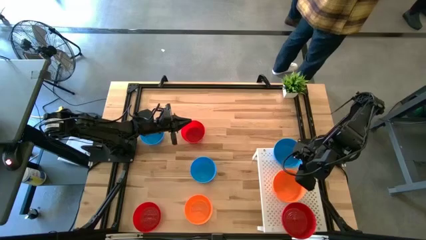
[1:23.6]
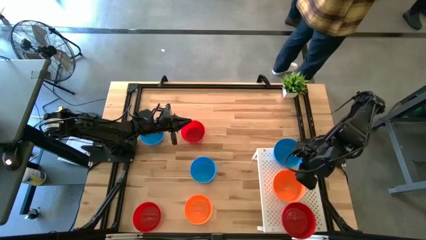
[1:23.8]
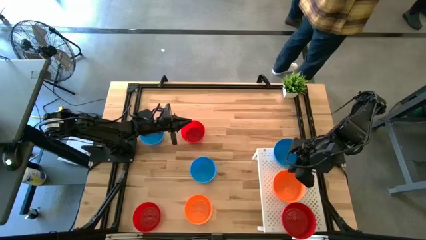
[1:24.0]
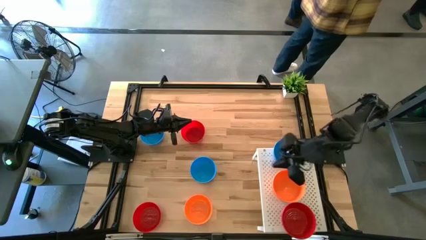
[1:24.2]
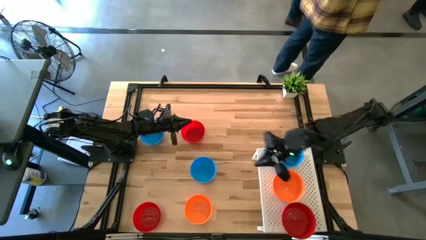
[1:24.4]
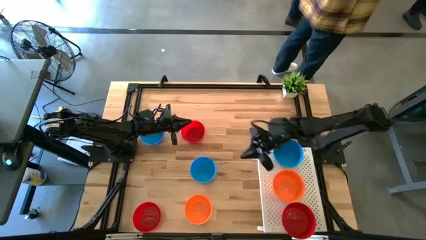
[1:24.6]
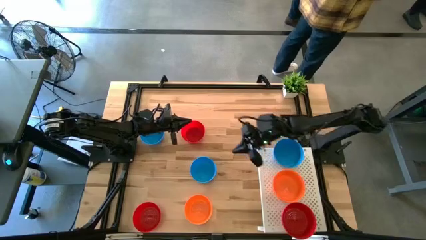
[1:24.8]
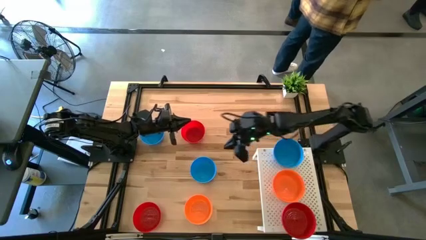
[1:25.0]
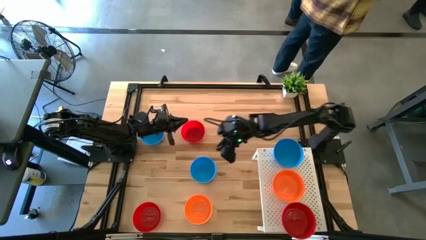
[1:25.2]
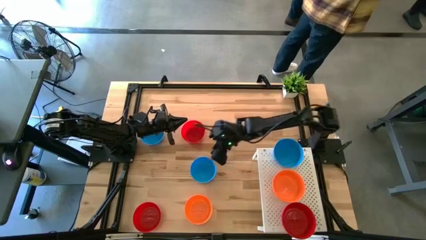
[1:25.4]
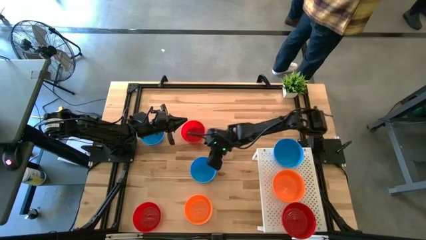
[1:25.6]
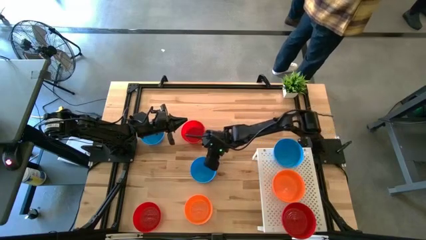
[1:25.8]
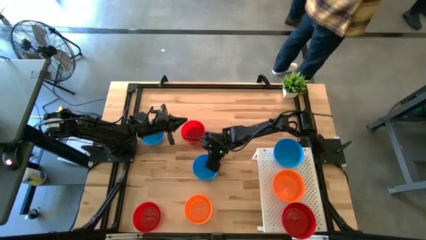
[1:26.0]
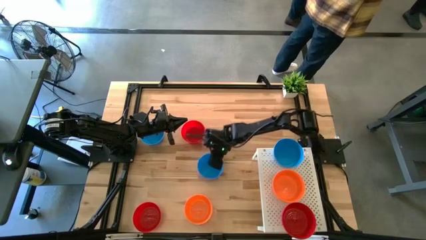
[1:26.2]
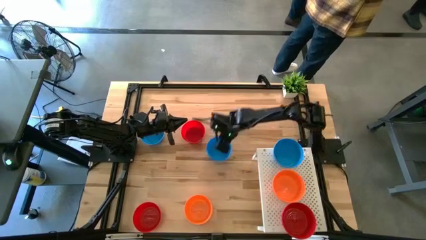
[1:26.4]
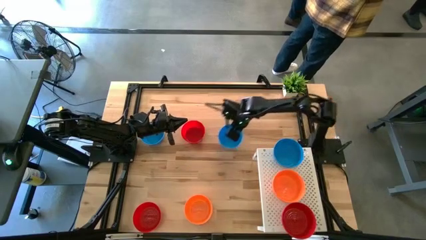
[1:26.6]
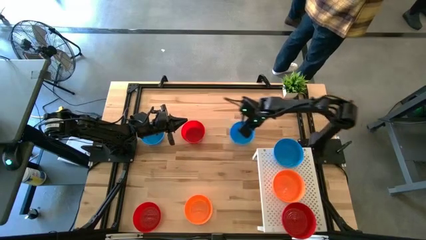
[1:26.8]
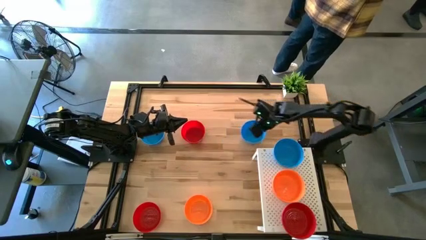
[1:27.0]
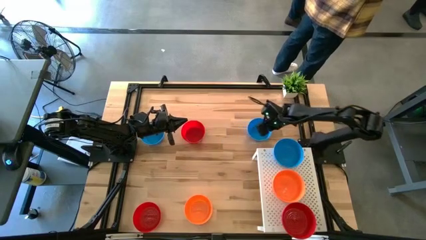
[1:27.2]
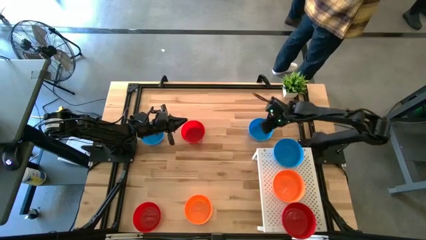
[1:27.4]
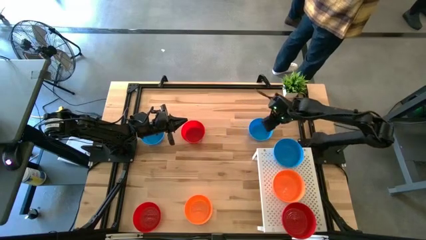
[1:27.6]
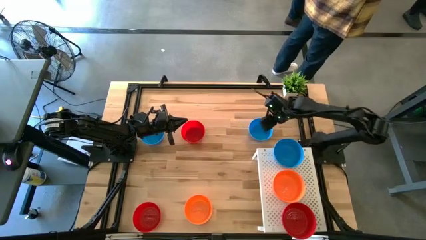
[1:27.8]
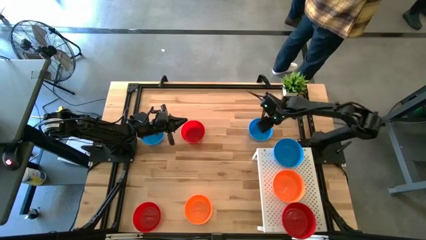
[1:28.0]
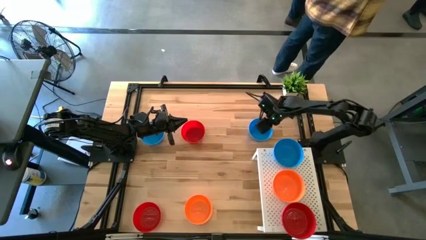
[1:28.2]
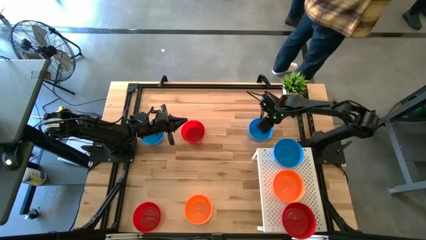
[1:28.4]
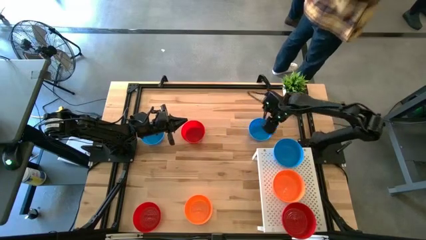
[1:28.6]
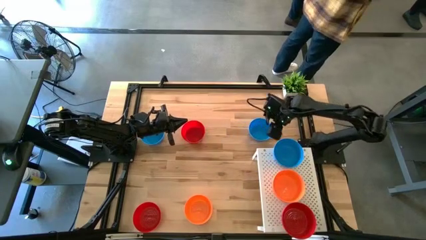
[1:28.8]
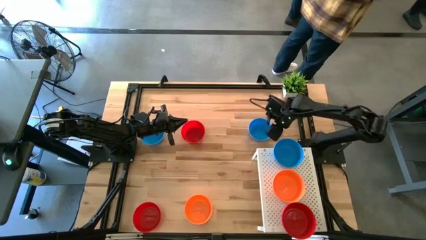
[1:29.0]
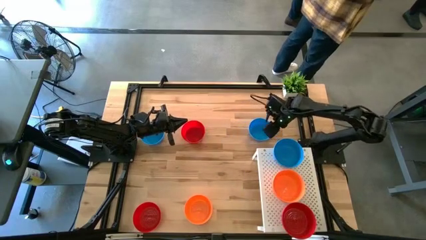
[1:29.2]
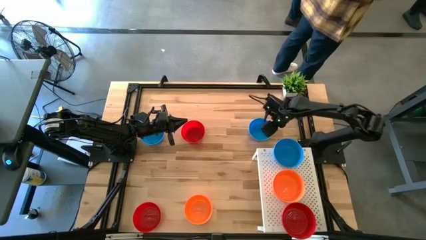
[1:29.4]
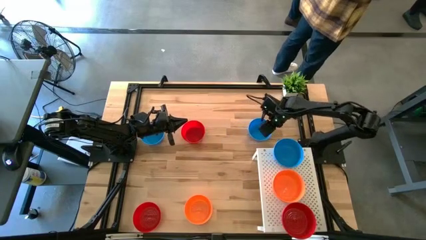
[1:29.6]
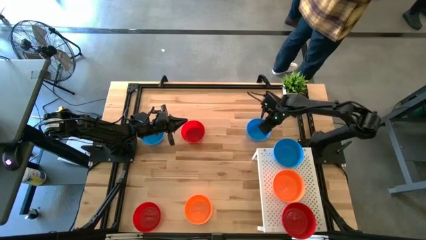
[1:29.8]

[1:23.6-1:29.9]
Task: Pick & Place Mini bowls
Stack the blue bowl on top of the other blue bowl on the shelf

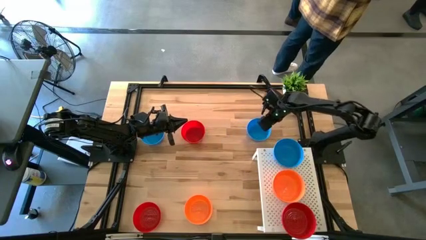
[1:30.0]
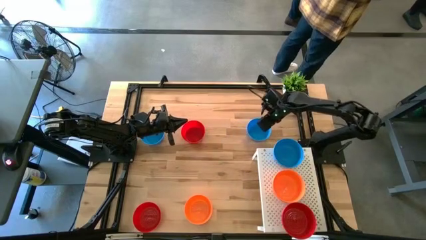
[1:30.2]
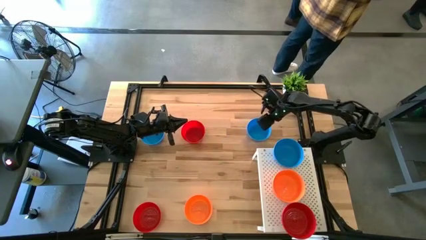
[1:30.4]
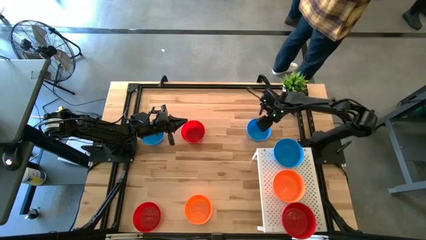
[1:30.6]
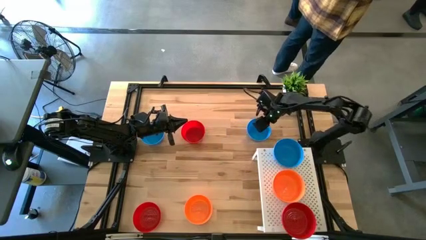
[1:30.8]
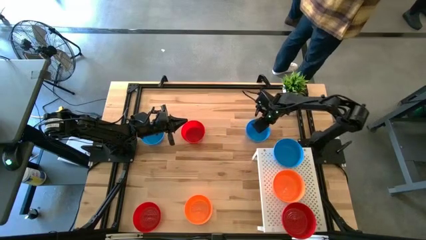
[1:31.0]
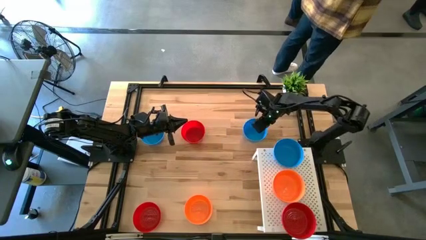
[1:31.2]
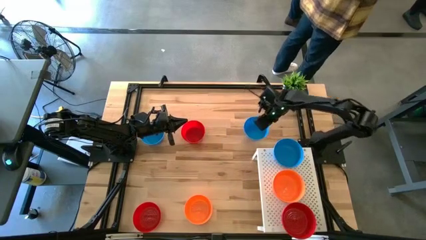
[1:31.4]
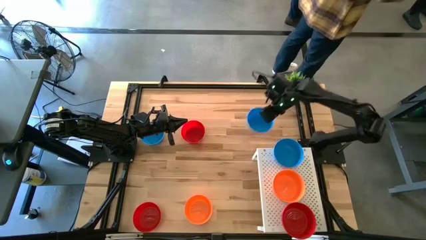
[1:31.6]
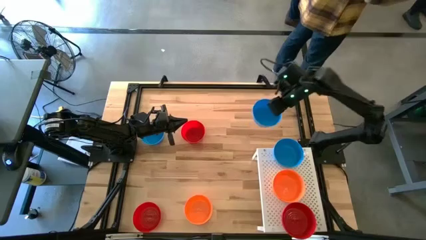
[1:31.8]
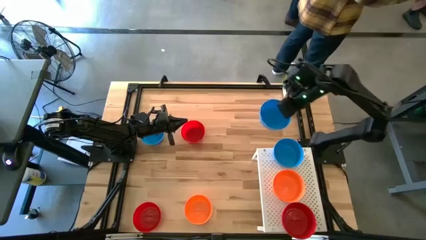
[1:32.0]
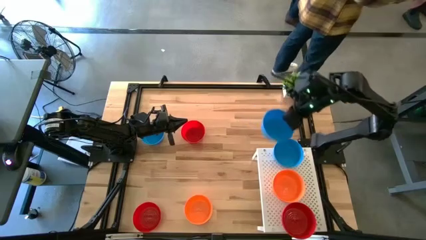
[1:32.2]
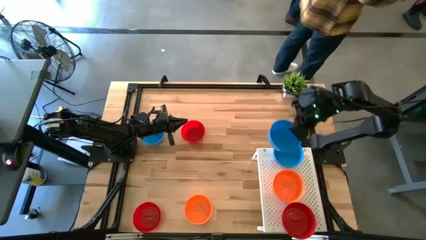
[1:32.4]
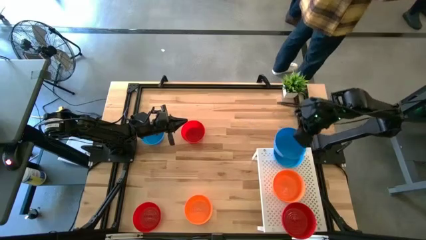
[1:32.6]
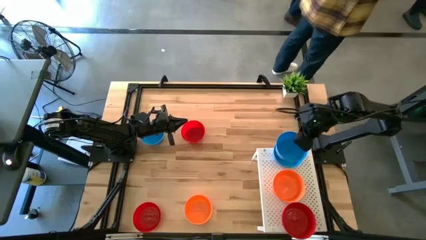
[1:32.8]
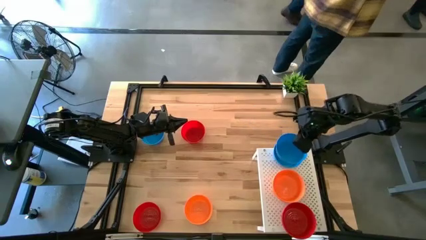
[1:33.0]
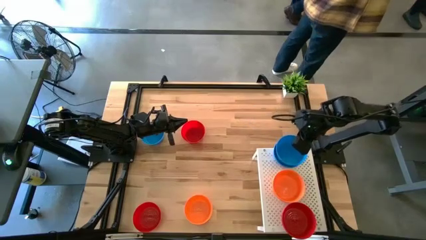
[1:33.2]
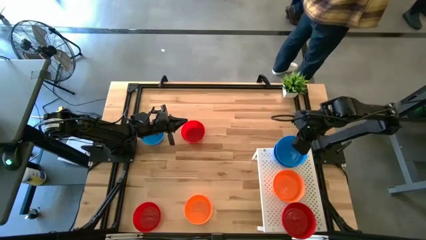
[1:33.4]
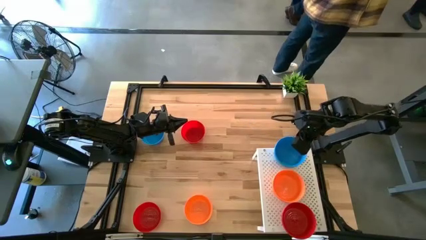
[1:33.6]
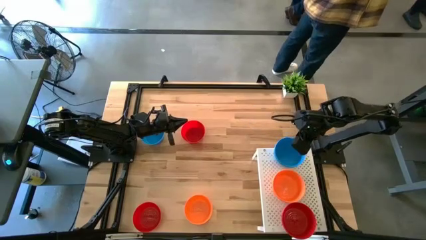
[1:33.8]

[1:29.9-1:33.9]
Stack the blue bowl on top of the other blue bowl on the shelf

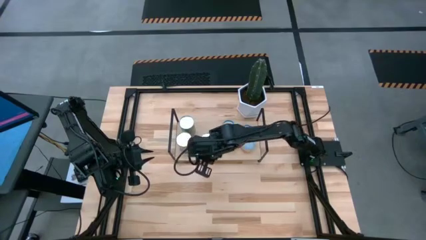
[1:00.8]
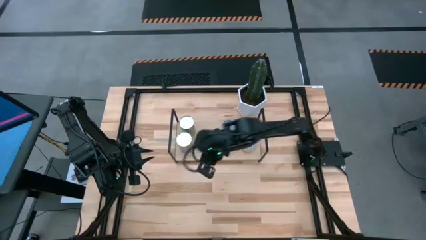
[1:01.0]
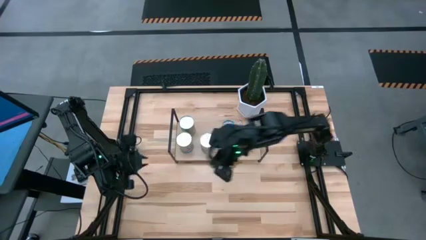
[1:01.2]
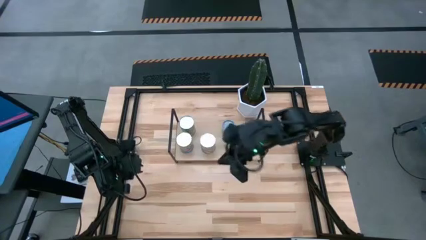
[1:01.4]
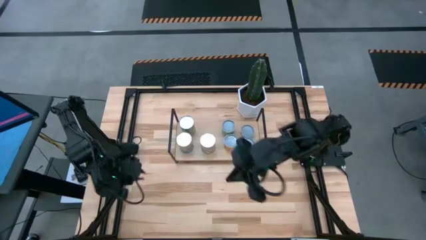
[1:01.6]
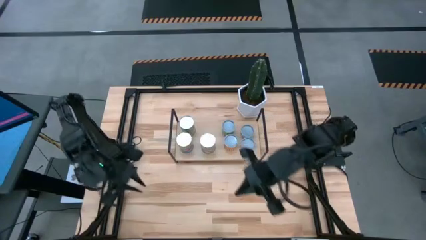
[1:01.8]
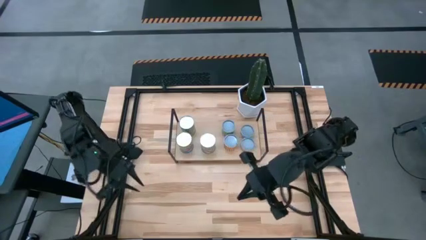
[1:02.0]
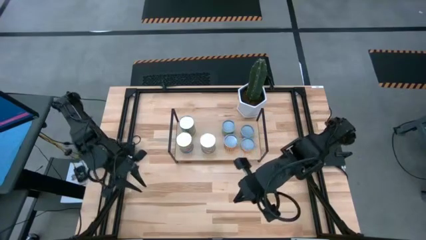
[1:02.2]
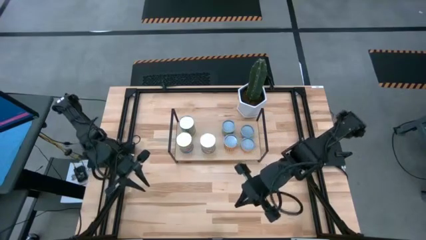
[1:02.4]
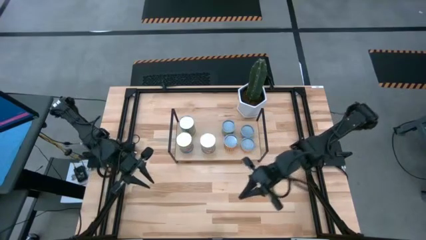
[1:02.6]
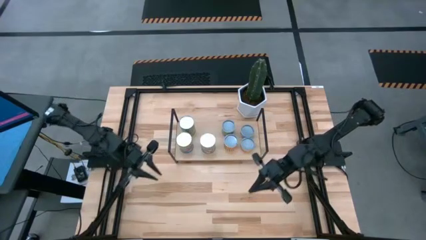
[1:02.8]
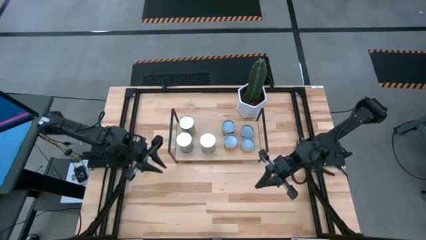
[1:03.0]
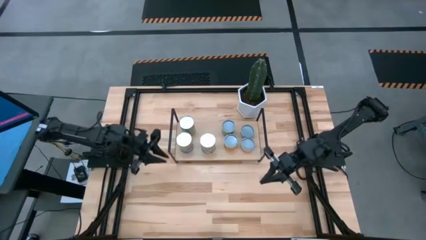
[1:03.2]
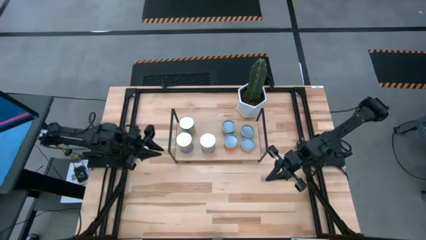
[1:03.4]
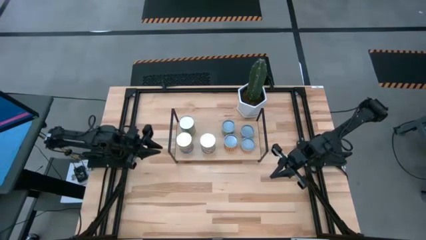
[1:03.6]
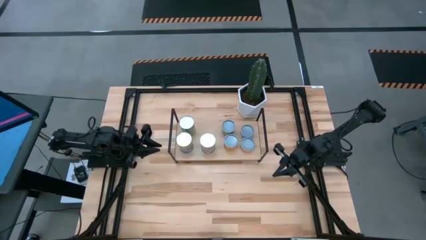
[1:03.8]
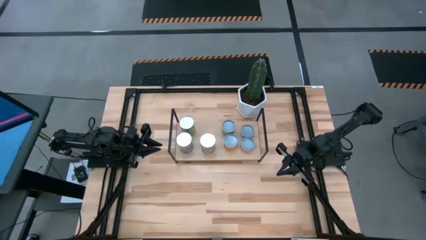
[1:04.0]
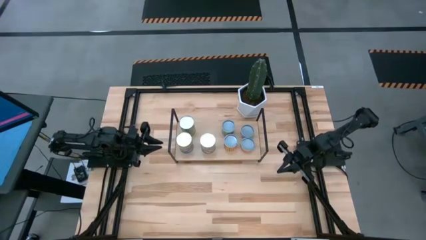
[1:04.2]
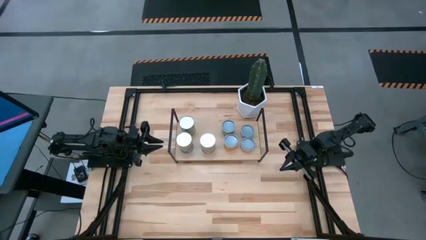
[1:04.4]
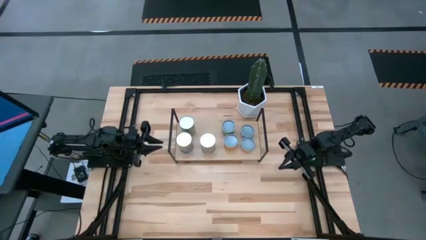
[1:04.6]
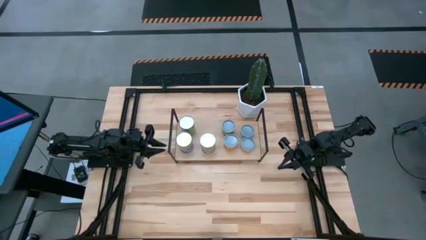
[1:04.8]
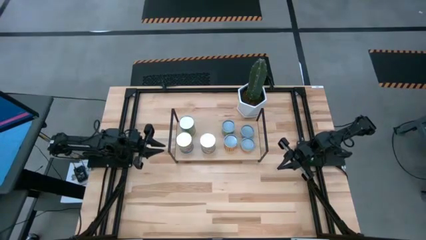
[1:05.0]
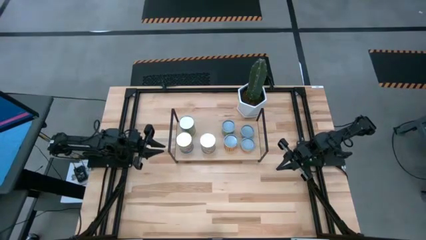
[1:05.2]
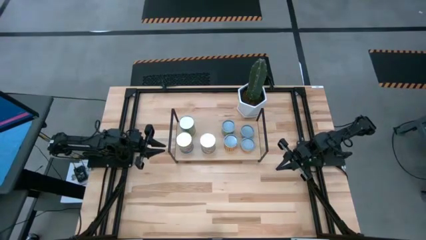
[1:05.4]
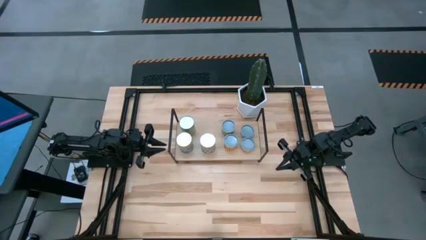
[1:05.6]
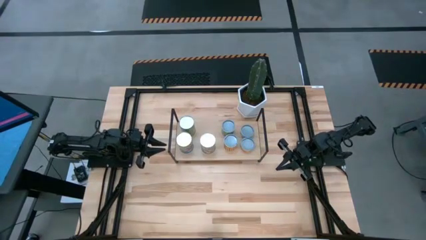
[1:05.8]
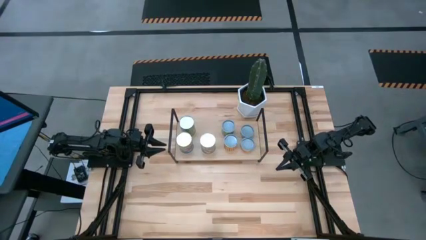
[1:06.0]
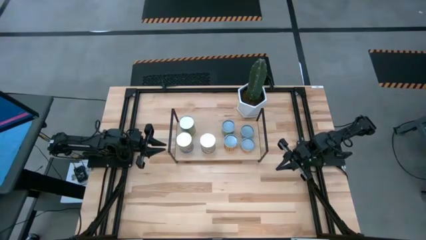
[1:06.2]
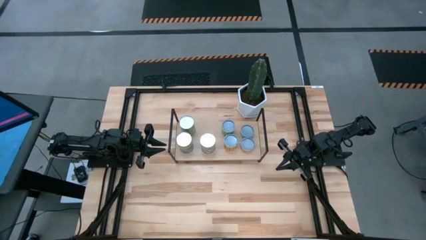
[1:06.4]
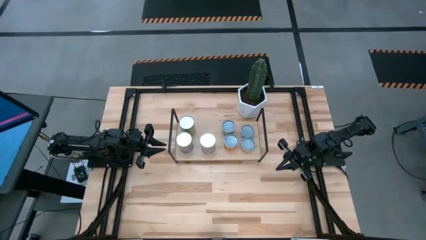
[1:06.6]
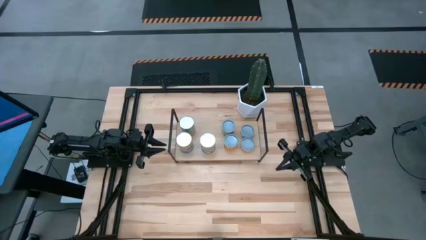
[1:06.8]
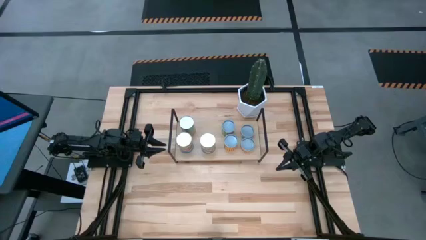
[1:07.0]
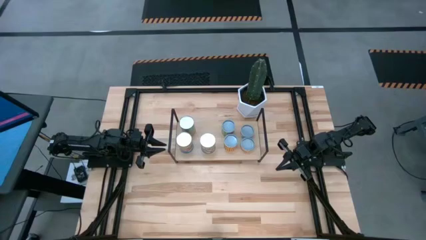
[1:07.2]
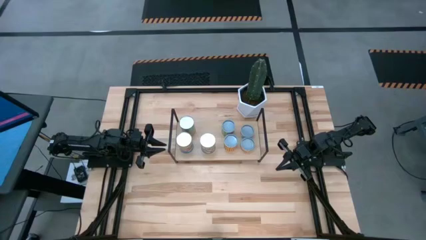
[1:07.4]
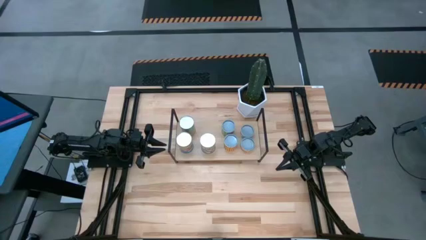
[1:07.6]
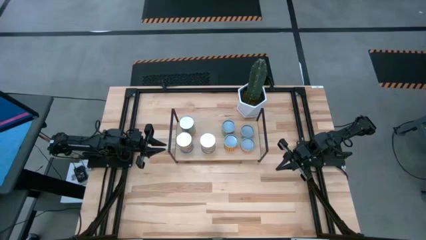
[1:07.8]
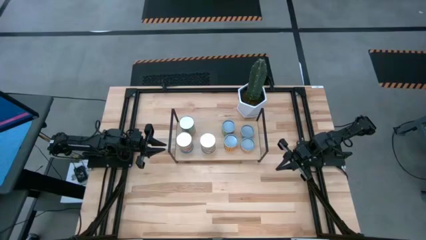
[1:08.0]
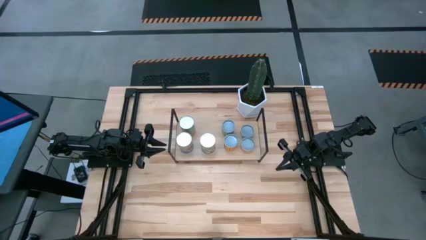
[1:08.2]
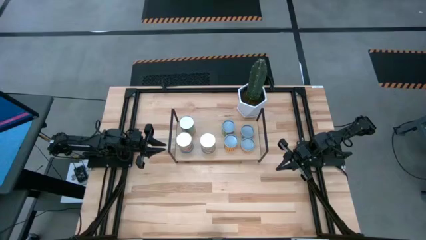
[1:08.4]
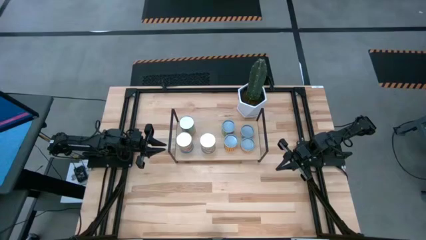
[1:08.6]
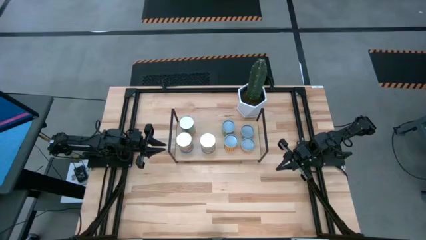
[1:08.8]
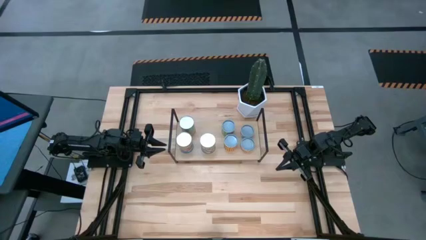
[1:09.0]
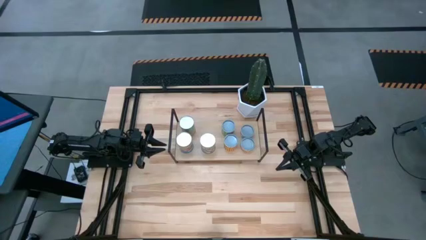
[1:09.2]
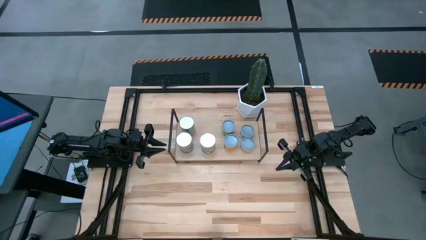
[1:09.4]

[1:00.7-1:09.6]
Task: Pick and place cans onto a shelf
Return to Home Position
